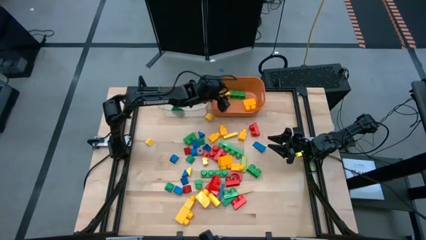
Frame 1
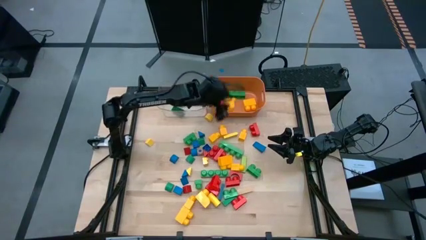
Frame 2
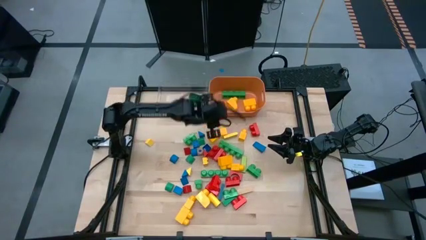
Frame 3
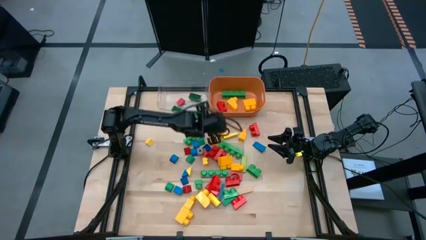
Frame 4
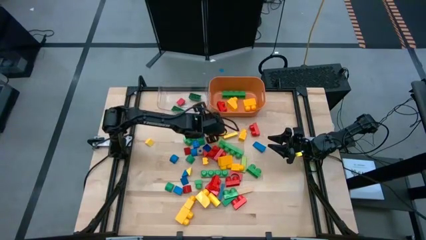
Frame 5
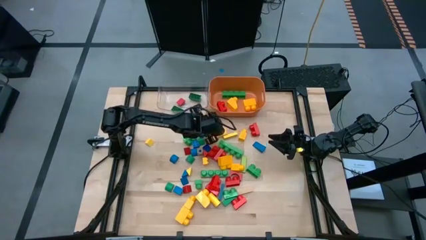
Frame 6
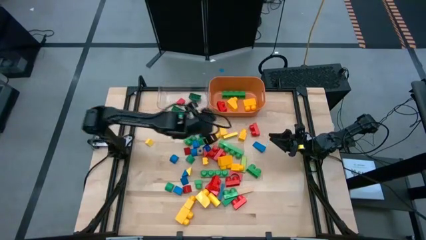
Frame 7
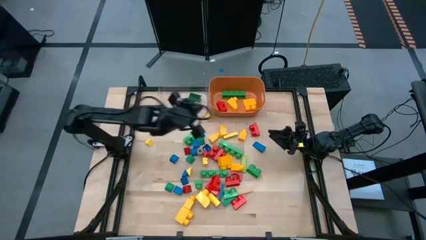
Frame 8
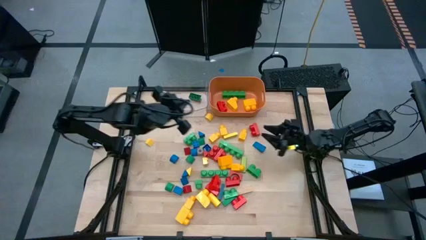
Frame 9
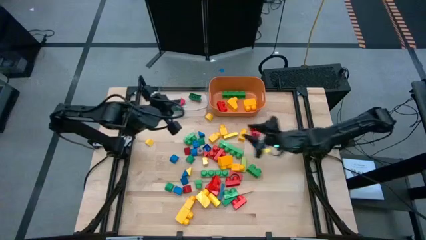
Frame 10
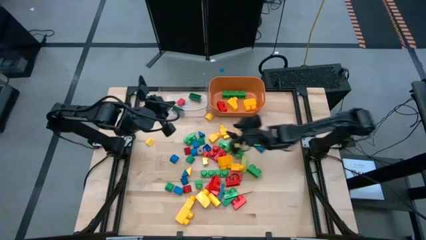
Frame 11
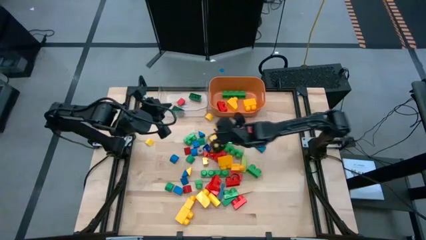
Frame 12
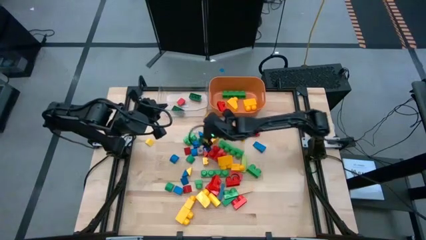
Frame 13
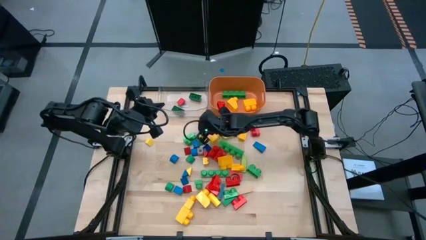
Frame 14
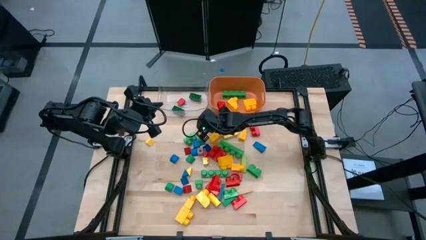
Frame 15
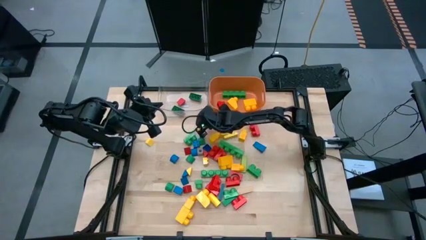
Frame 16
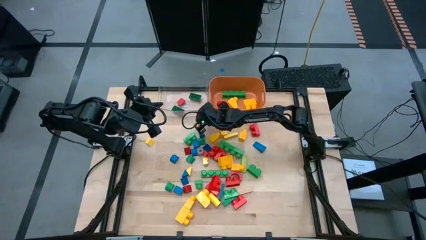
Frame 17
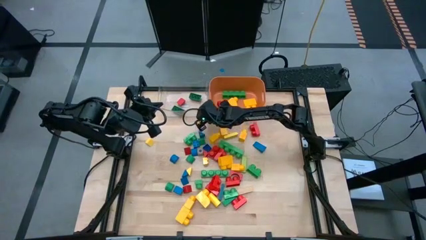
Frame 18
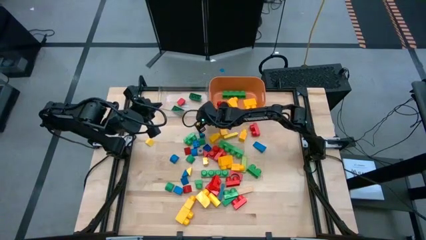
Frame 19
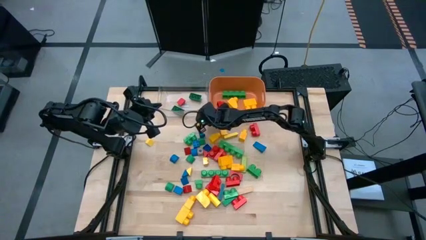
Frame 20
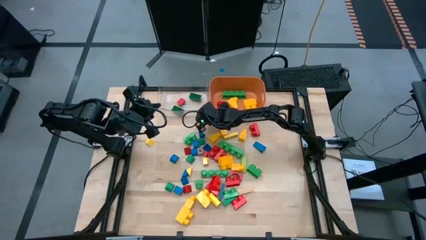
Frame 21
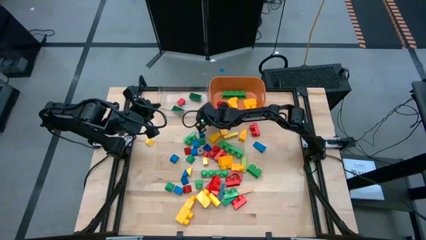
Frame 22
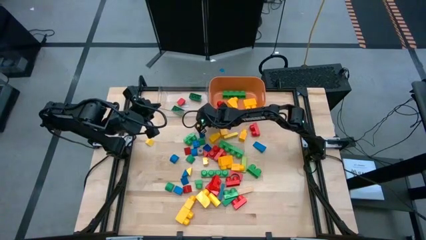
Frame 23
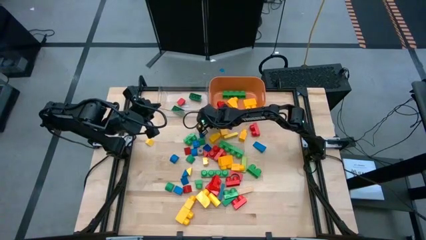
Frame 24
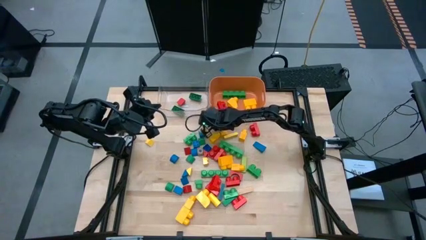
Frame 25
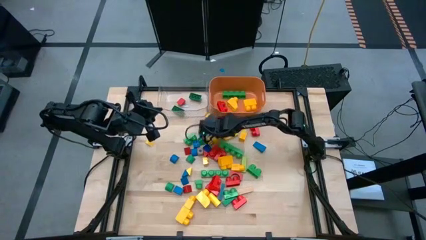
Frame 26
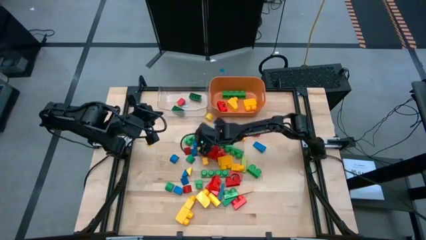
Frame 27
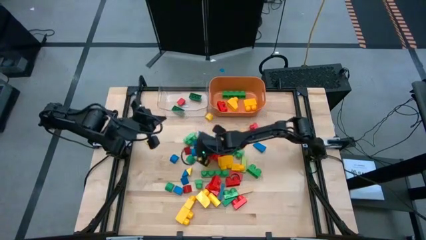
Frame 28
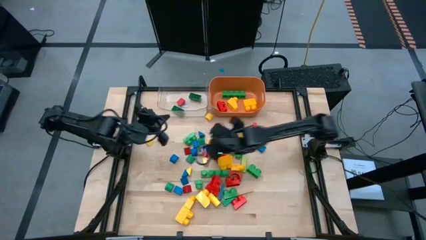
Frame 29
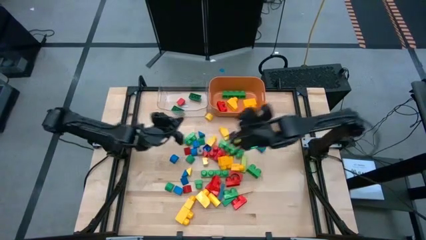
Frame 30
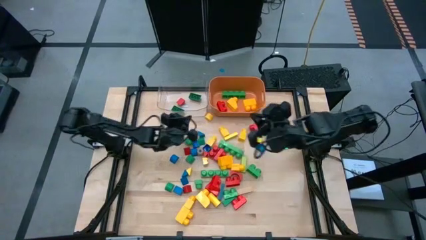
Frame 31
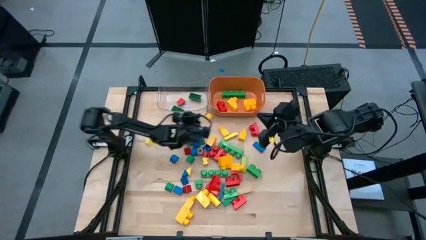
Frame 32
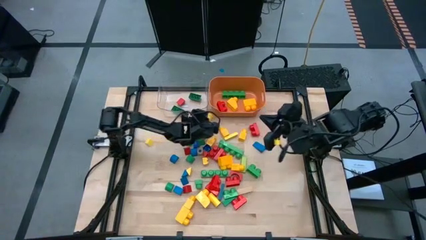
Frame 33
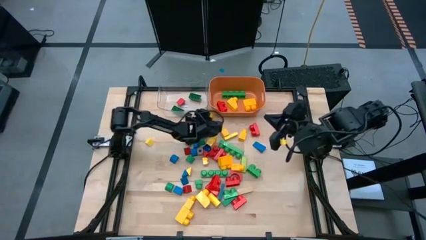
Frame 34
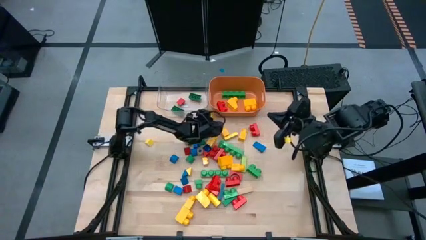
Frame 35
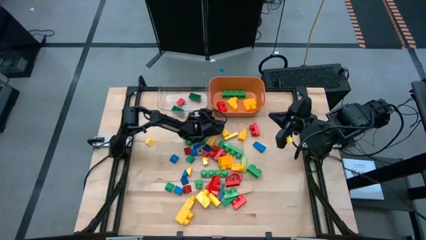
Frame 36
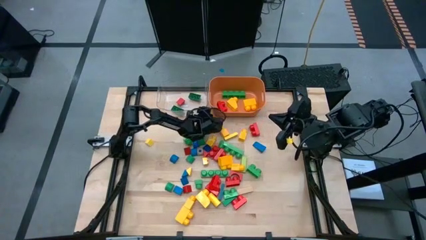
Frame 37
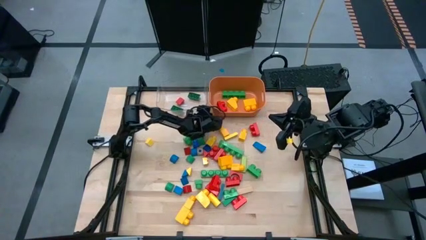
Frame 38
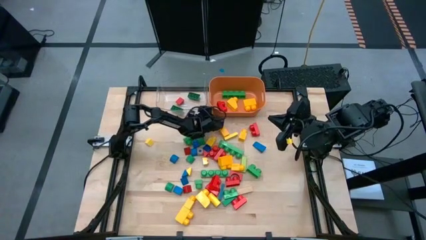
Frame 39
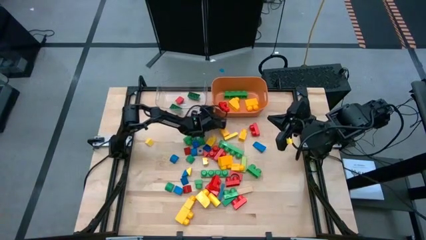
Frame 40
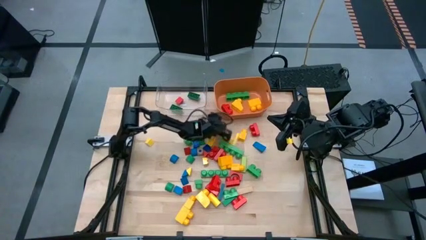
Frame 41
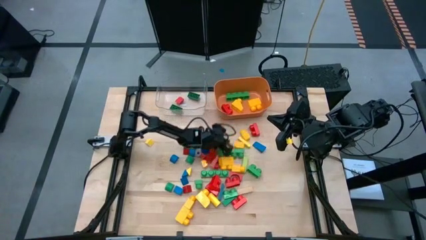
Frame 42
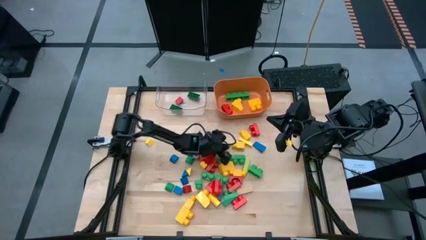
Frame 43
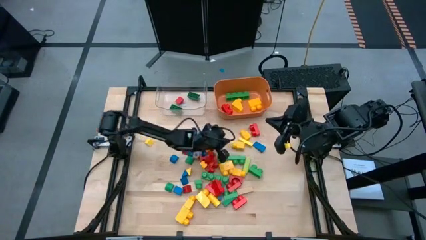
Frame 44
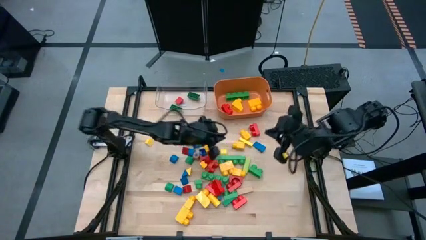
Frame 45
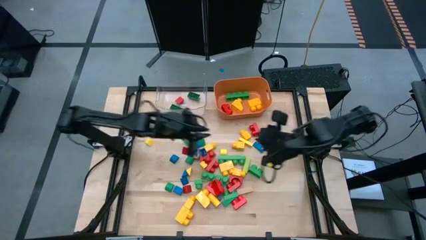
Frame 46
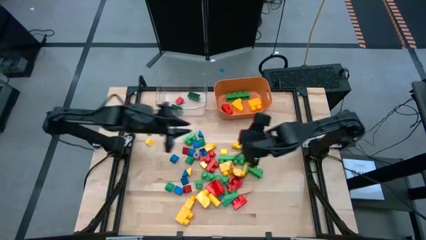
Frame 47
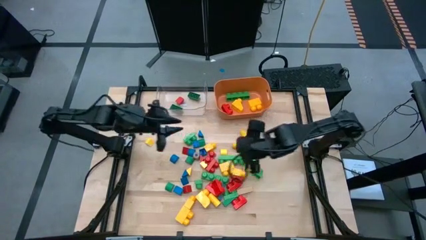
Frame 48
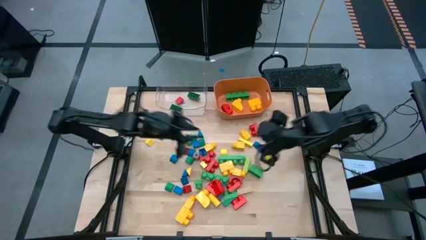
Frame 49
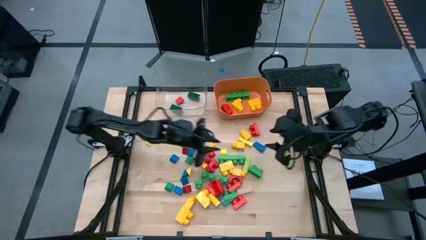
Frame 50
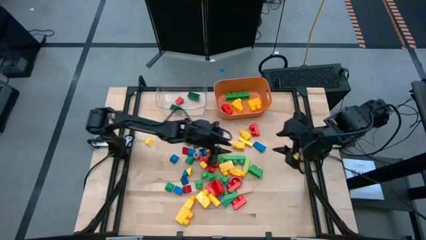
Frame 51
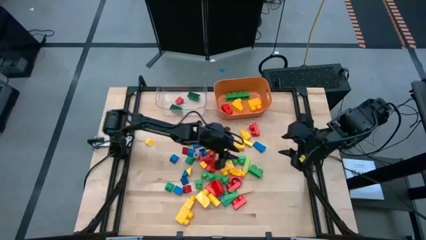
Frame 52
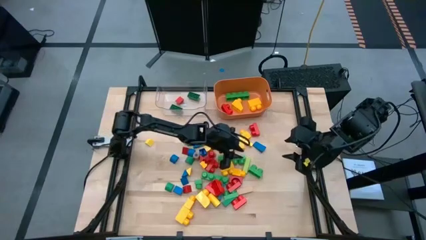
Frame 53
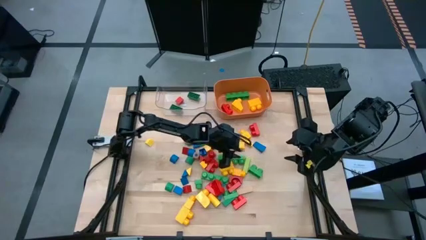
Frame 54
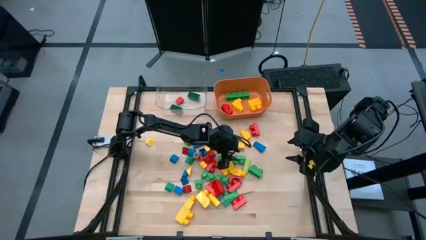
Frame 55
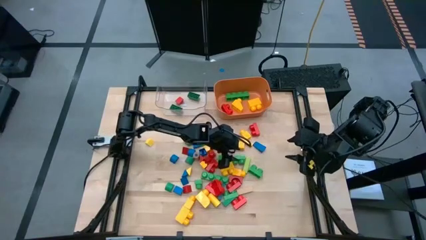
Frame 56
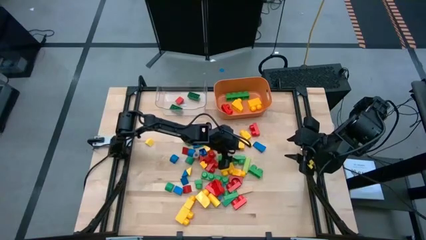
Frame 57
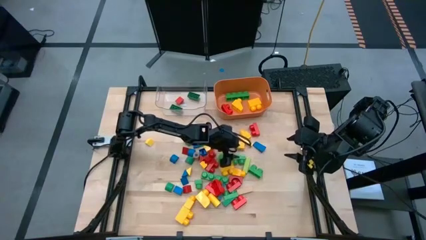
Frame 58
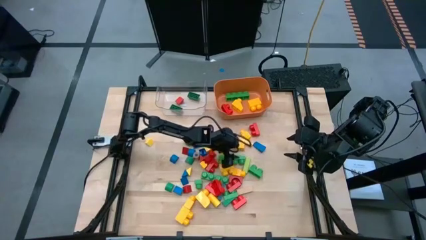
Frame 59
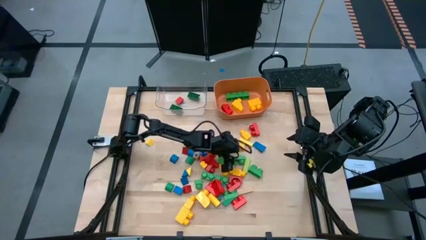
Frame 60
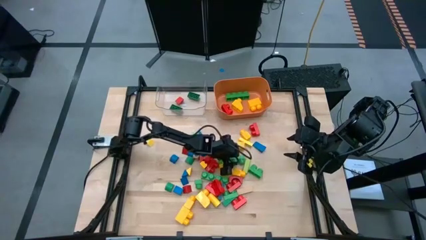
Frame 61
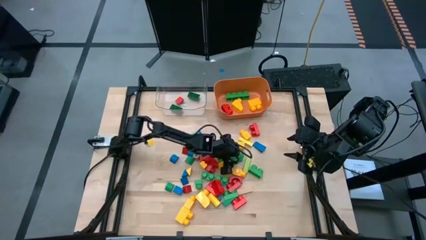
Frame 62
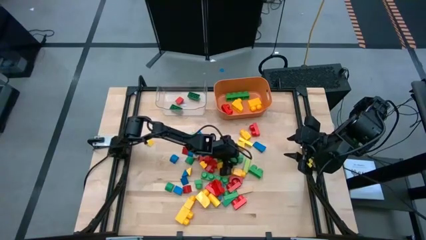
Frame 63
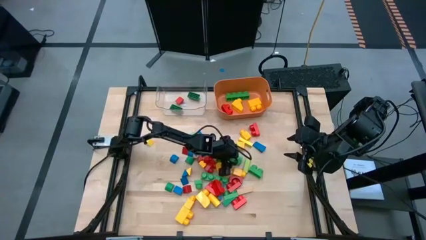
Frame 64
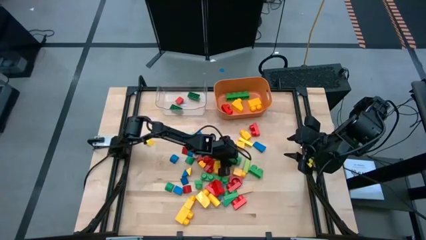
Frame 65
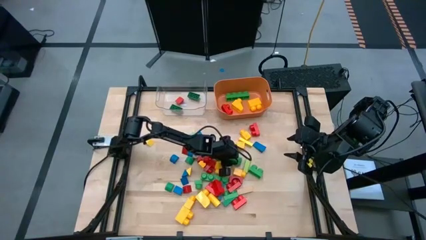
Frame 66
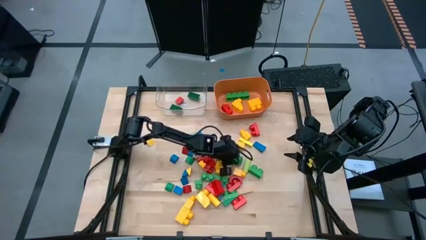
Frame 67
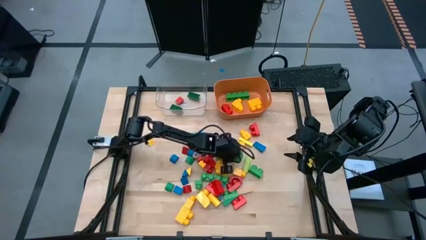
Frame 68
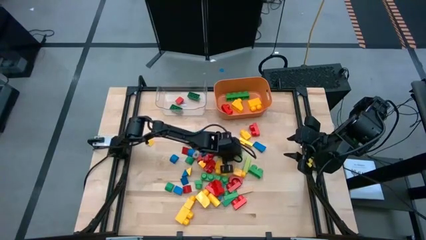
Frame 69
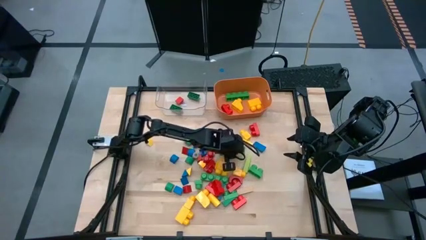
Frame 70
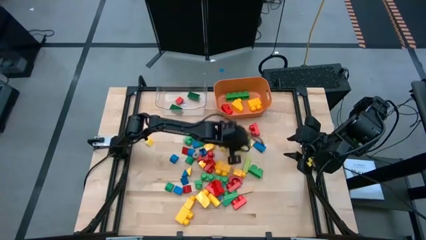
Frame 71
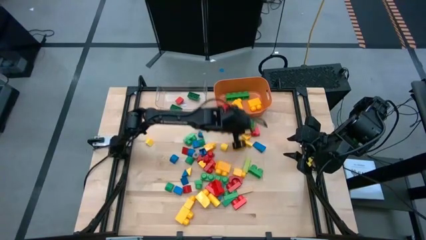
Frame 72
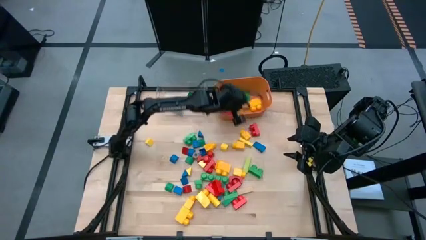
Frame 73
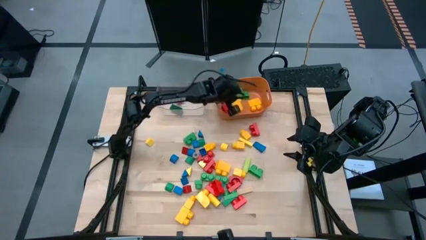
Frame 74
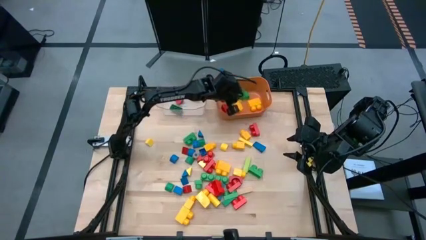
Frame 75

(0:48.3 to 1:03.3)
Task: Sort blocks by size
Put the big green game piece into the orange bin

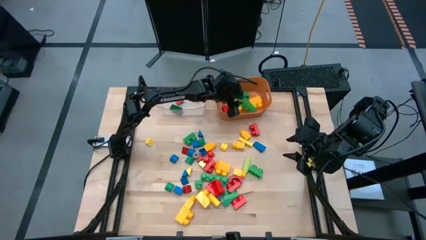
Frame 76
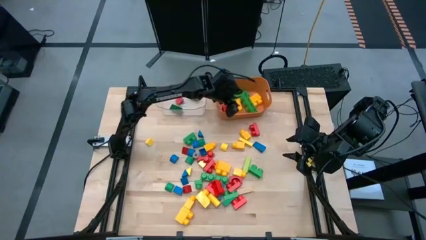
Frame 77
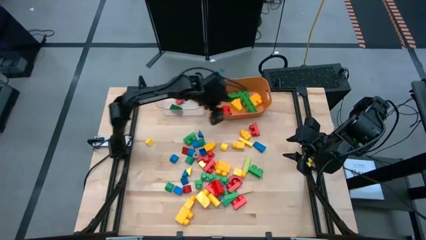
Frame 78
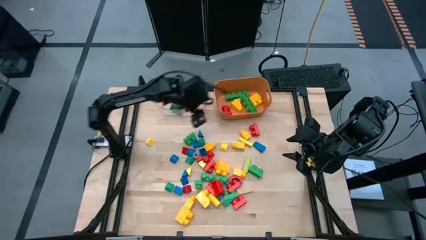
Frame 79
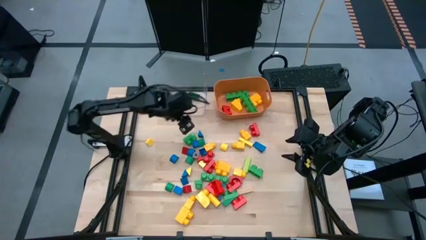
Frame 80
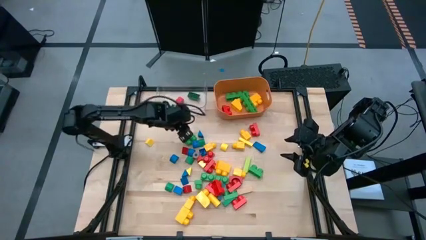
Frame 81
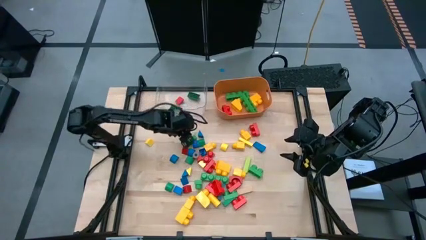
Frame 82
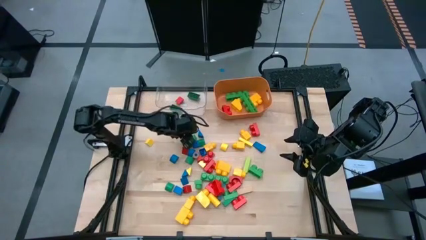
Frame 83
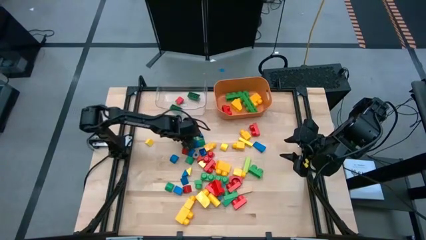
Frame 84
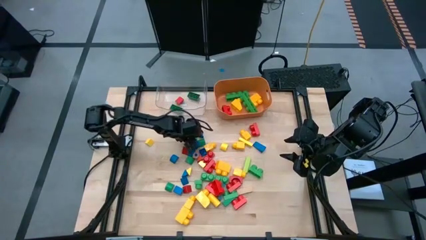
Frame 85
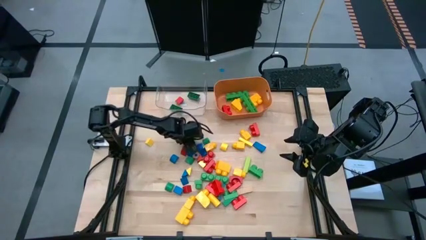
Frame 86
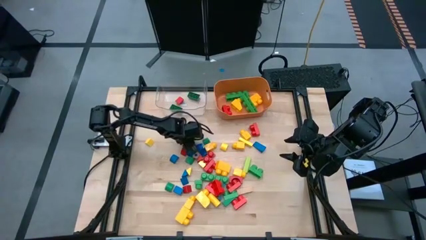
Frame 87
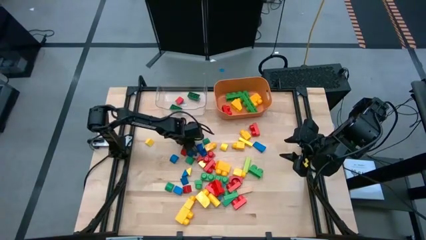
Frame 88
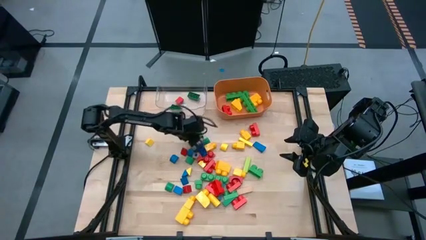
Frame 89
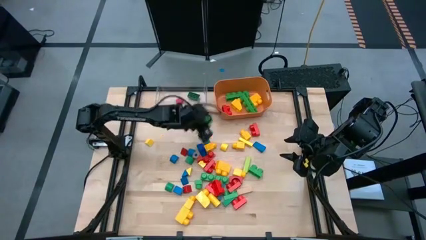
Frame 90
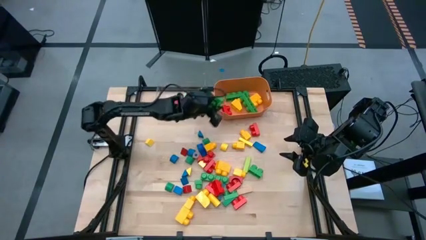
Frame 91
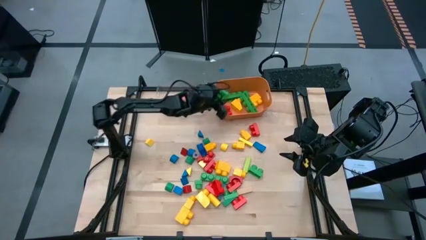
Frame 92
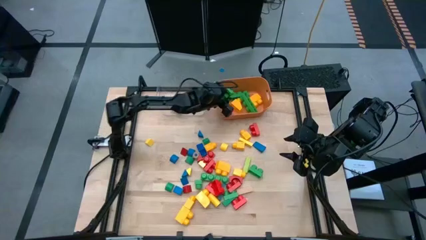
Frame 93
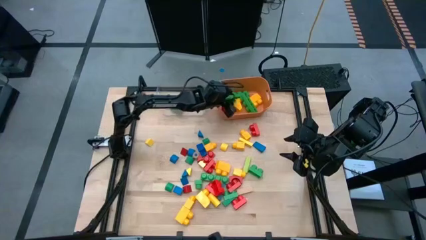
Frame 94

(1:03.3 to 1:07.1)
Put the big green game piece into the orange bin
